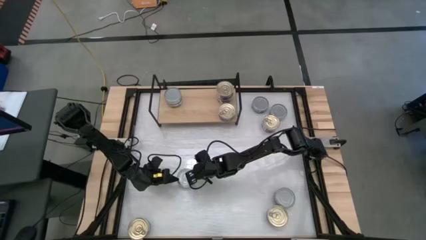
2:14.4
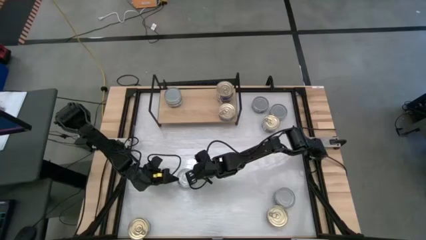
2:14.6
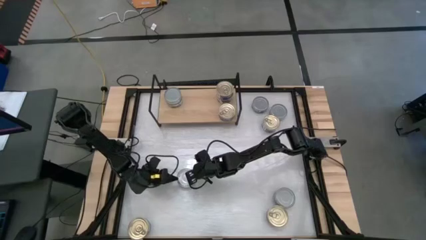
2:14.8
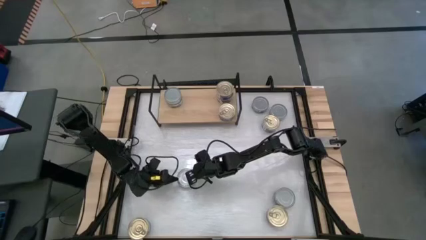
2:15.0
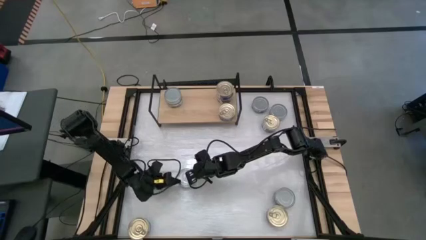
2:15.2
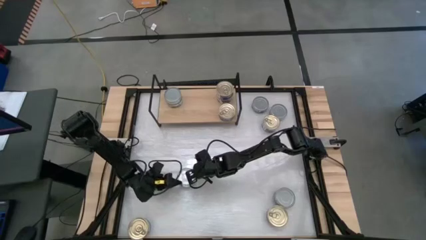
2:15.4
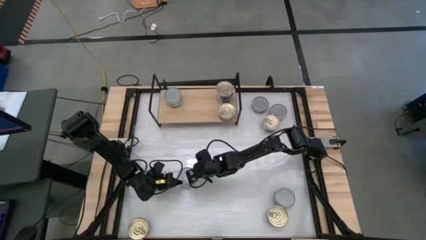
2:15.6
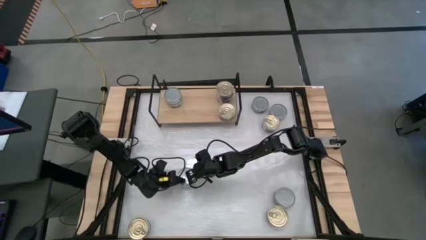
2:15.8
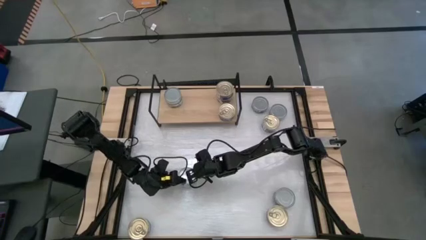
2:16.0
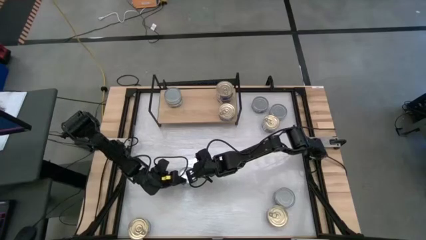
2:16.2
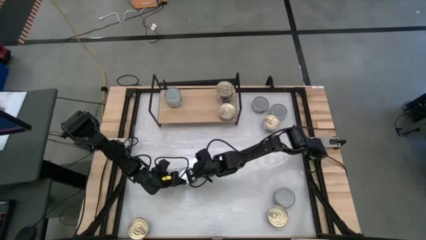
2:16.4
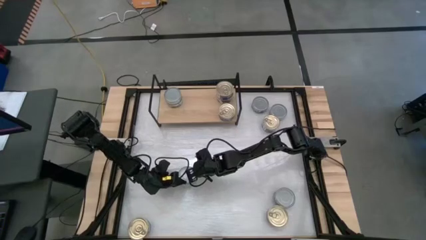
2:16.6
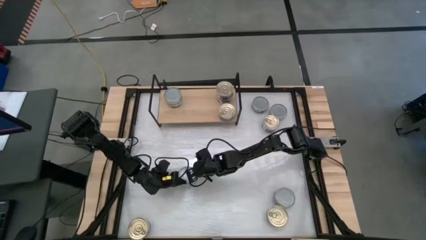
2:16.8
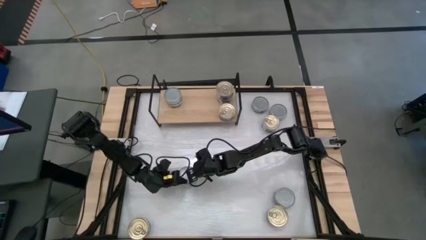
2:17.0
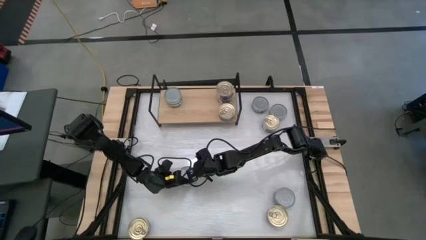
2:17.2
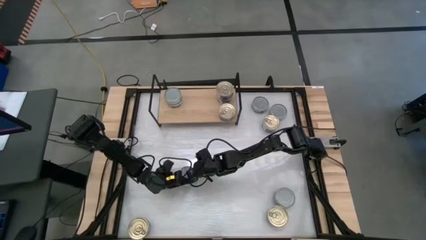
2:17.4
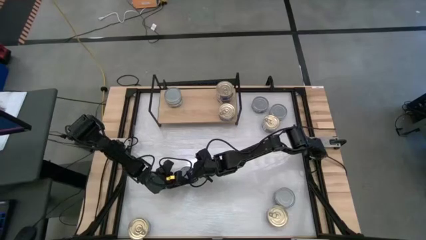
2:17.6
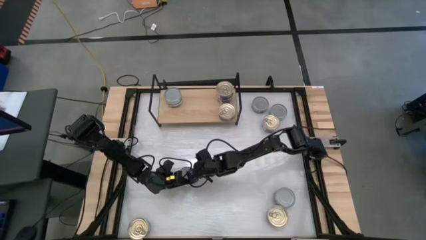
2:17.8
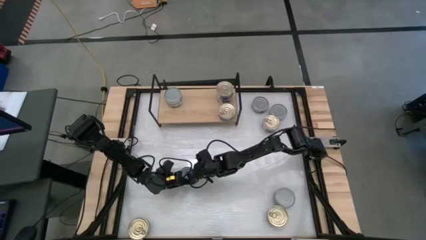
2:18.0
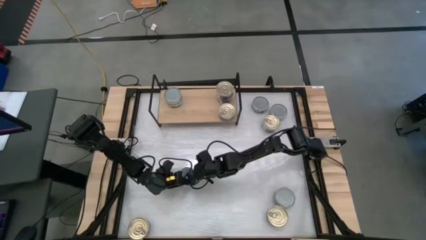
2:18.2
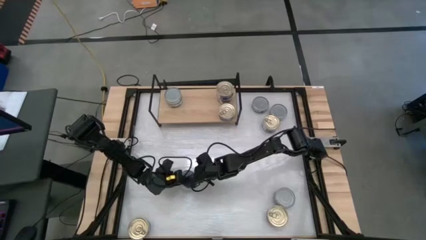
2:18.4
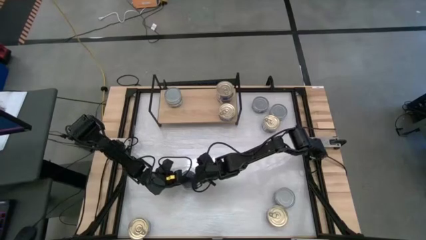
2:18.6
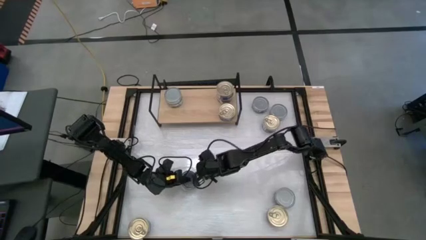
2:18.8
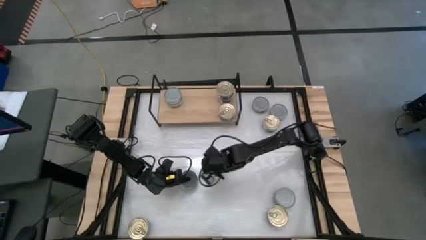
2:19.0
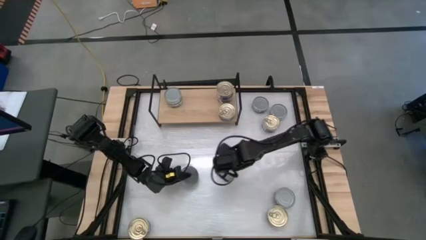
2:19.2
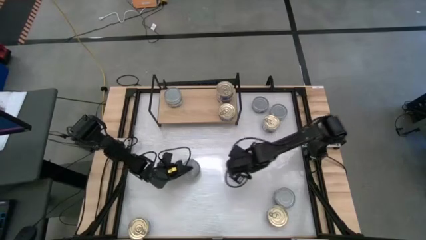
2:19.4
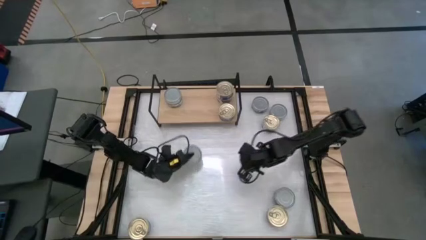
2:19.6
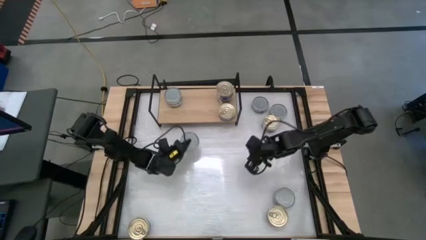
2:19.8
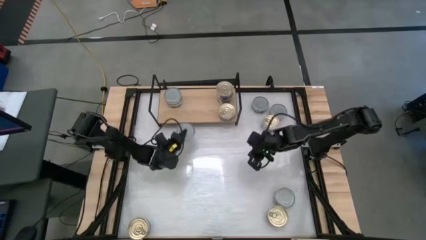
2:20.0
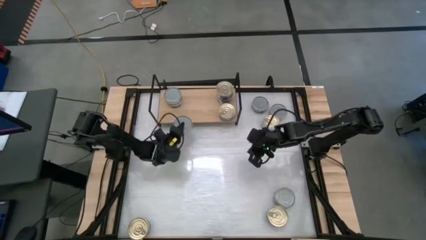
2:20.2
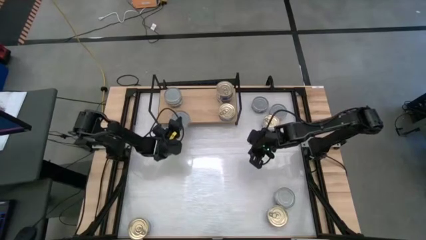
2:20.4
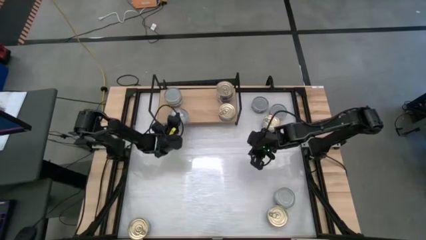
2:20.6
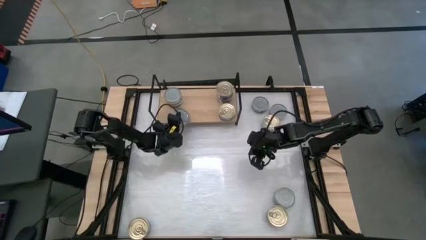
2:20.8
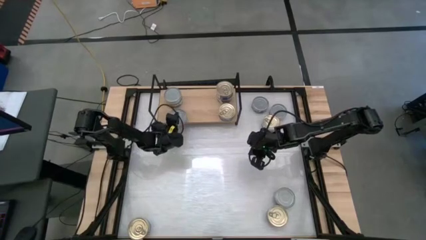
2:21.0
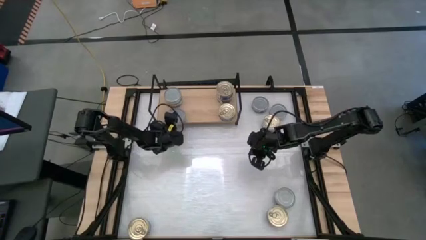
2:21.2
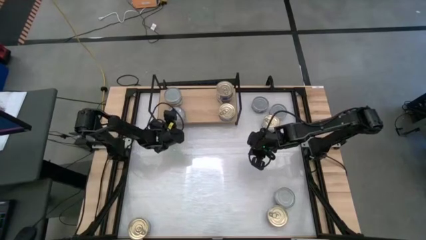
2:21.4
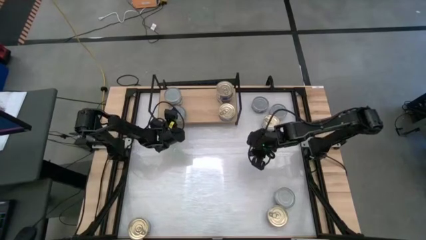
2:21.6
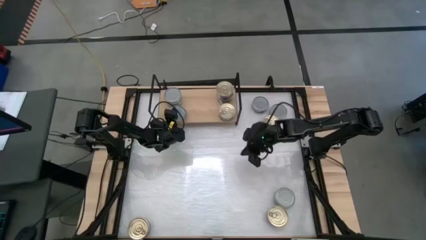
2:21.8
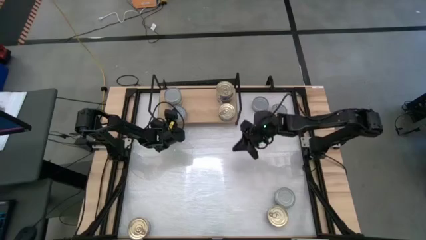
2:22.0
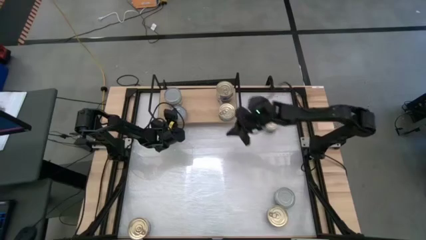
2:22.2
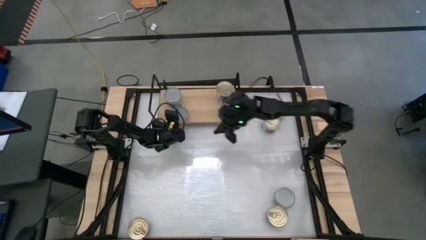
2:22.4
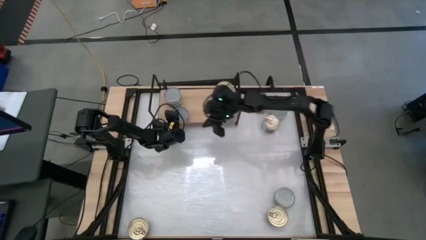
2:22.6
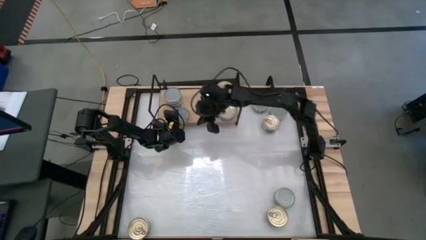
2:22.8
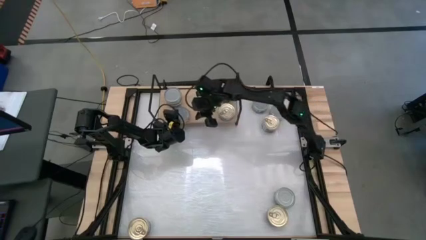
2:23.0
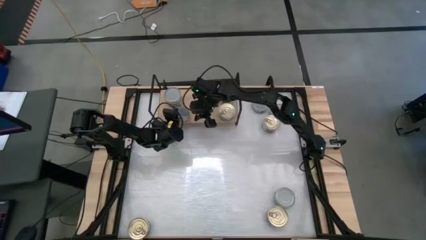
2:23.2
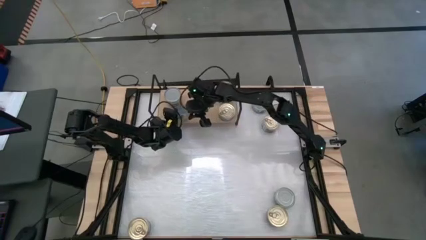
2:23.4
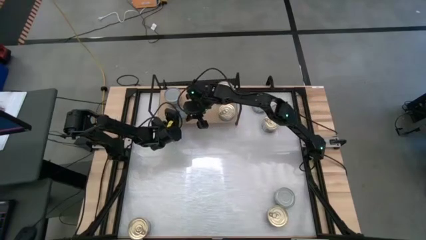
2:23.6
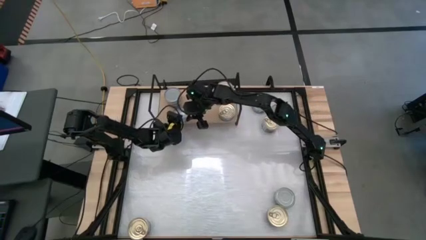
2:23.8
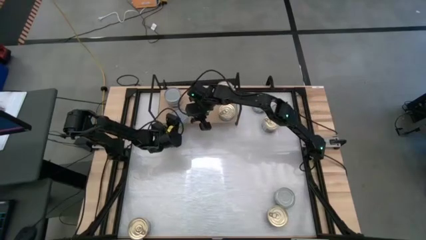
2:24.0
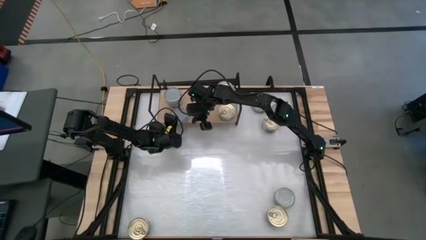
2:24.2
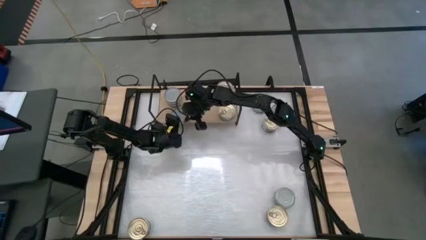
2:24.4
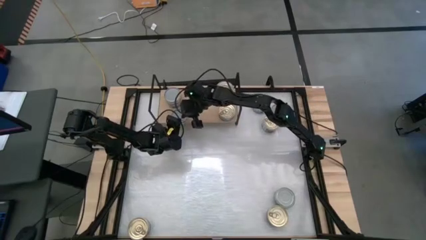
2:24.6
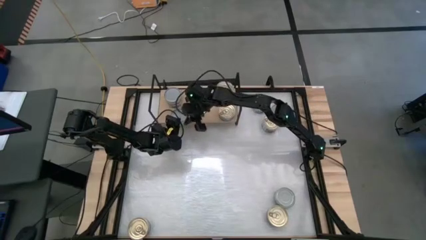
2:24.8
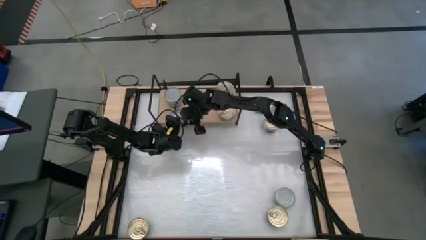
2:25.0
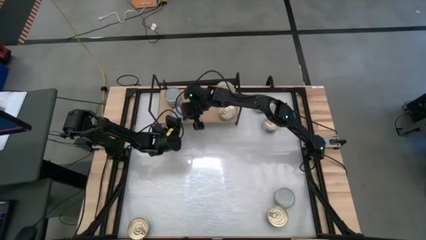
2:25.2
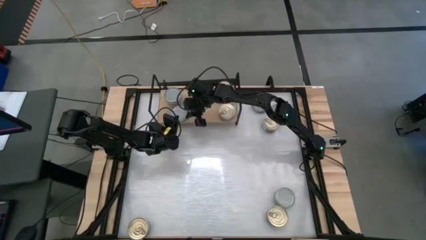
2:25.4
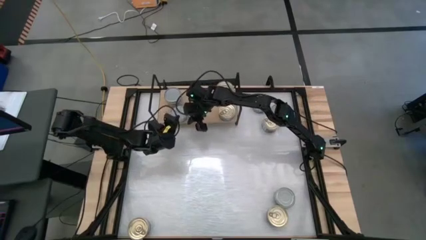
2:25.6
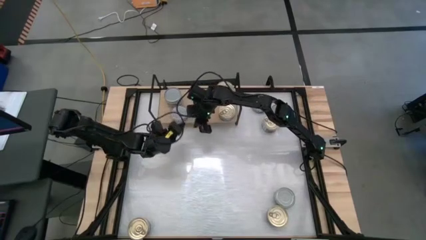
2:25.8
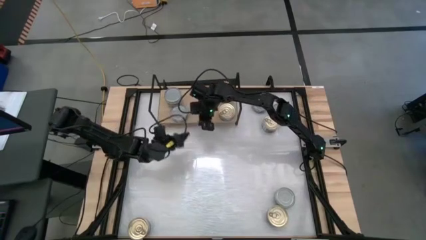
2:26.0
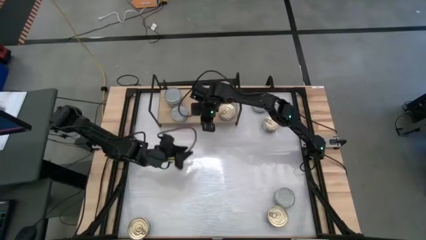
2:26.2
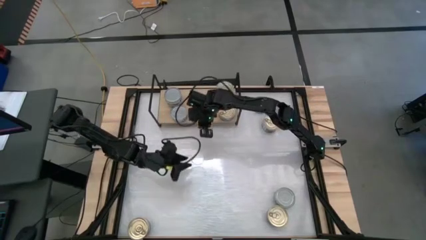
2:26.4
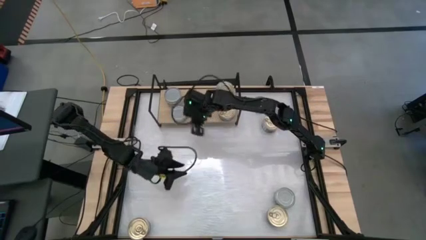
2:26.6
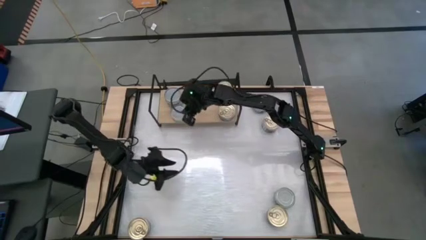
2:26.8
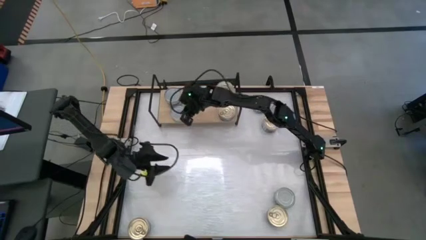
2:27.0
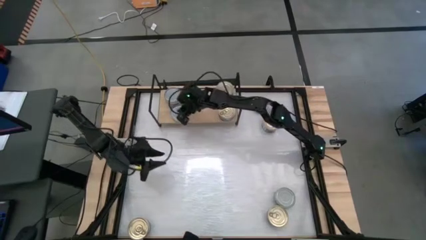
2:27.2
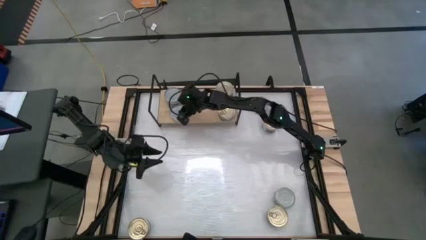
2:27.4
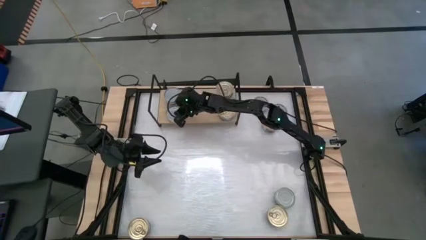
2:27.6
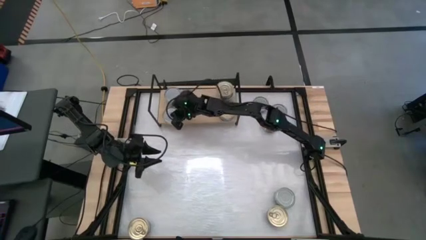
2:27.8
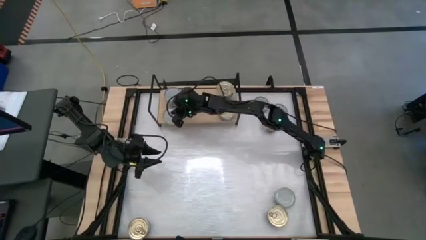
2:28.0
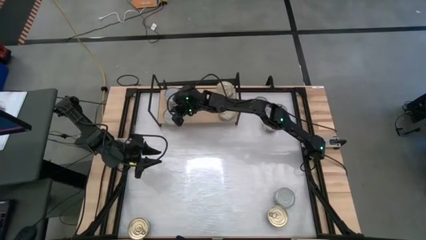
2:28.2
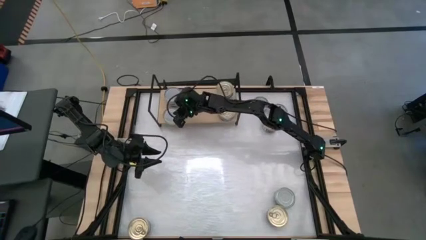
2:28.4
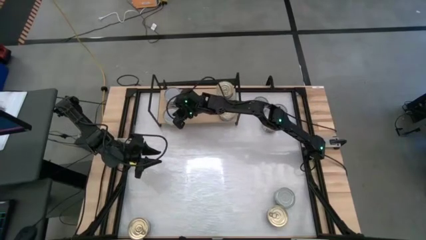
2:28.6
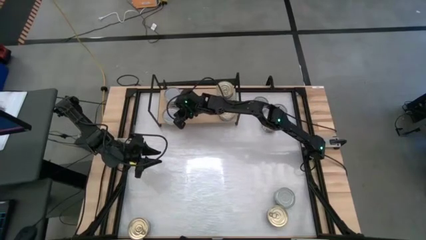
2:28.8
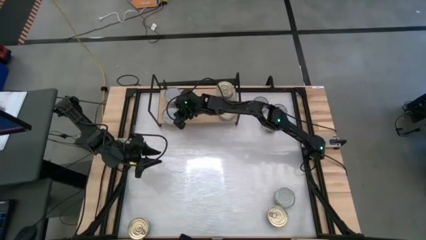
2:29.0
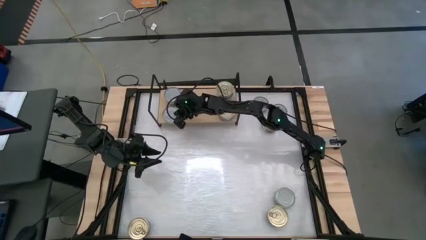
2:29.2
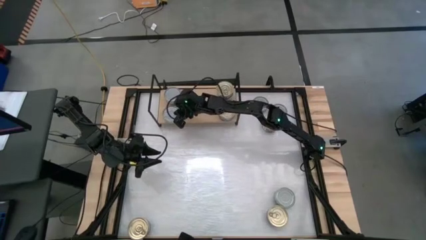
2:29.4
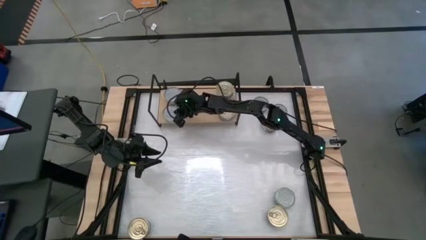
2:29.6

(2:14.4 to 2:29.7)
Task: Stack canned seafood by type on shelf
Put the green tuna can on the shelf

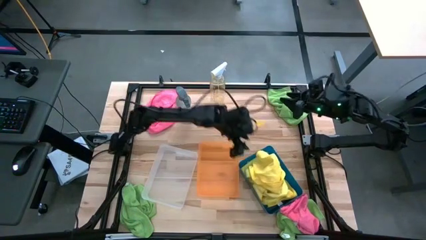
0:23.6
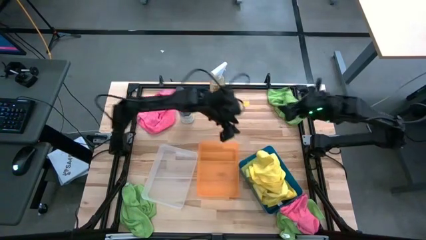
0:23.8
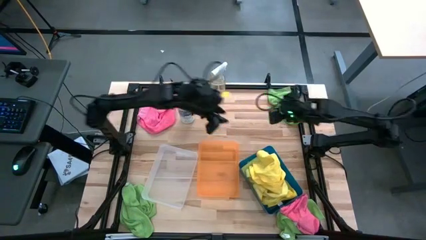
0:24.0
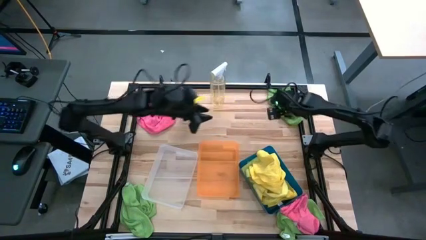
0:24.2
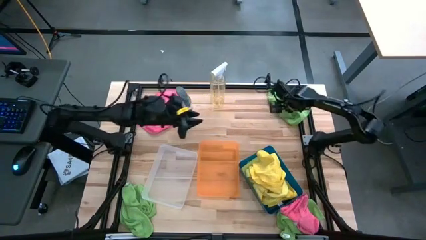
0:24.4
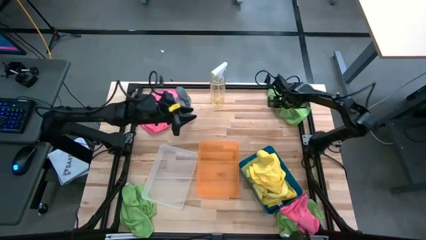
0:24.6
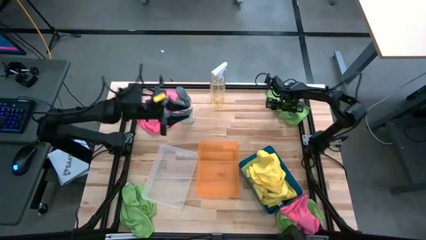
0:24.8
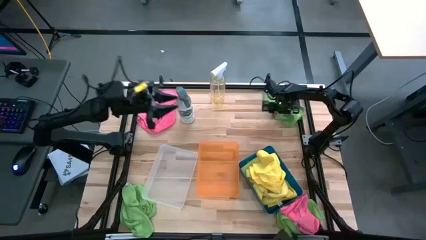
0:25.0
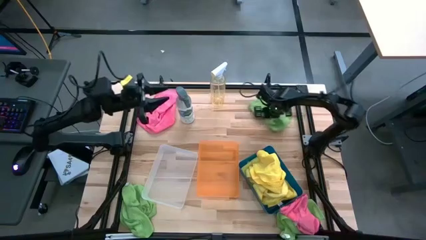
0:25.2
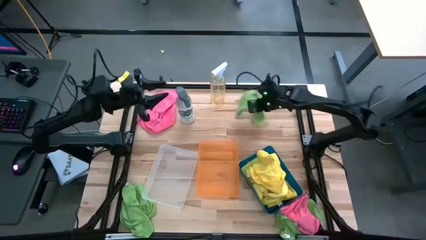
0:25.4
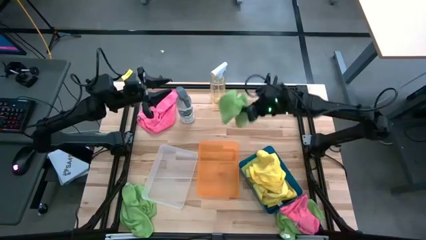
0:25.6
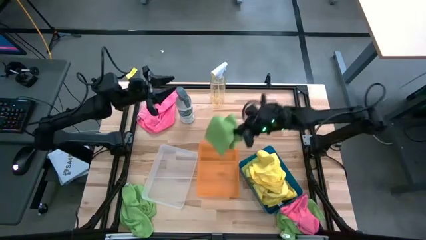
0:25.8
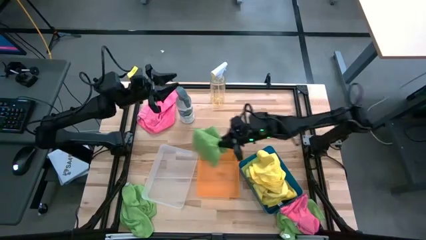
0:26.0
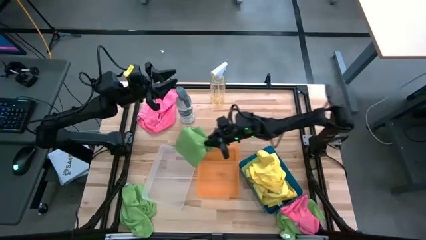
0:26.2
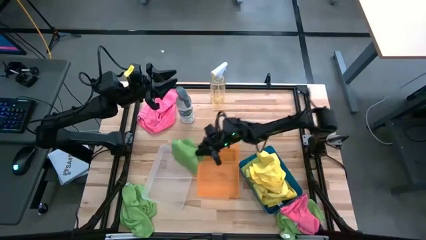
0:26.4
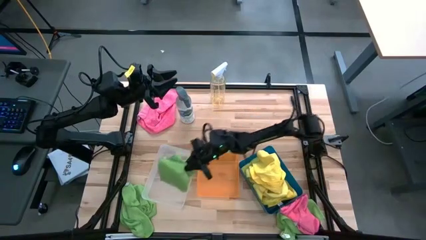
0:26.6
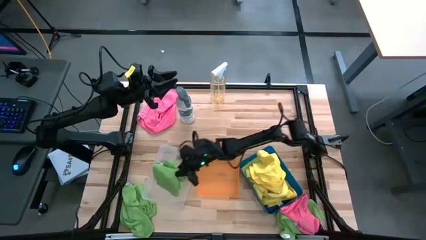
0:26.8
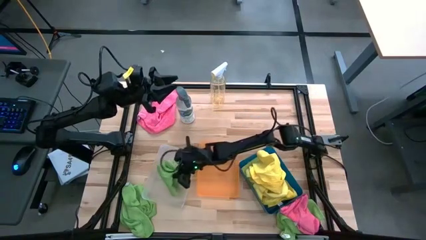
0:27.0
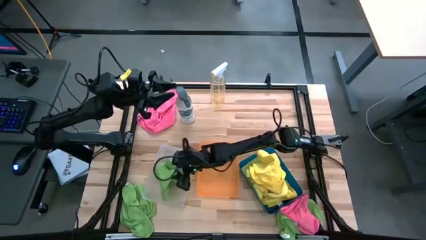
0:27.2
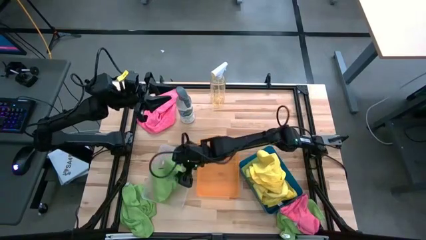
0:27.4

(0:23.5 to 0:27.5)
Task: Sort microfiber towel by color & place in baskets
Put the top green microfiber cloth into the transparent bin
